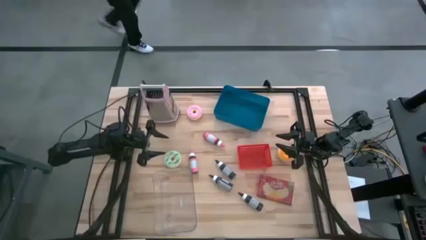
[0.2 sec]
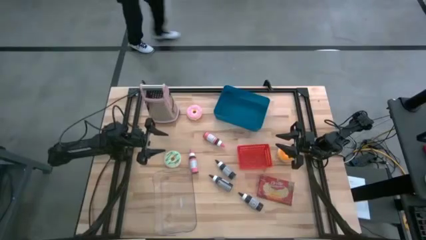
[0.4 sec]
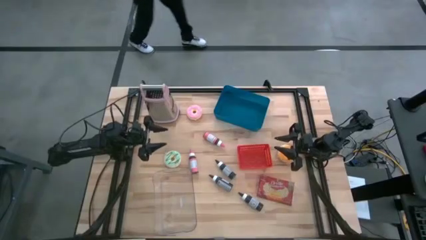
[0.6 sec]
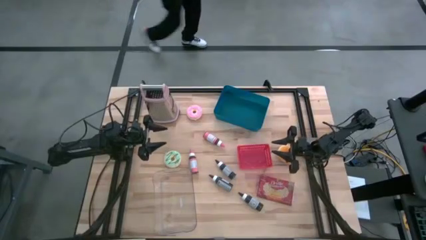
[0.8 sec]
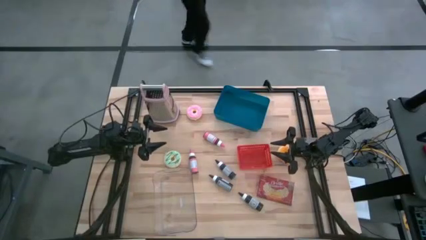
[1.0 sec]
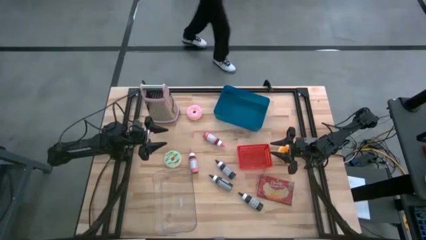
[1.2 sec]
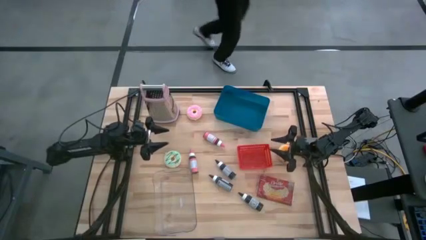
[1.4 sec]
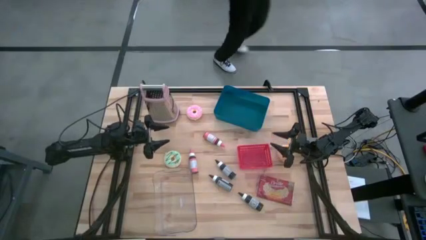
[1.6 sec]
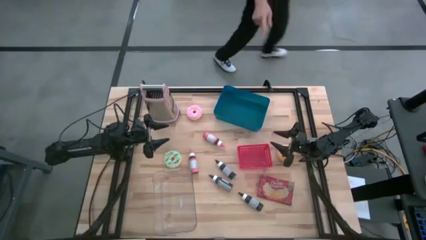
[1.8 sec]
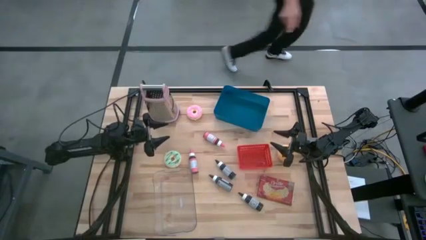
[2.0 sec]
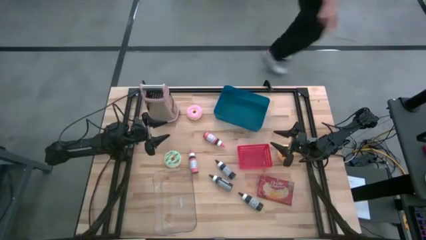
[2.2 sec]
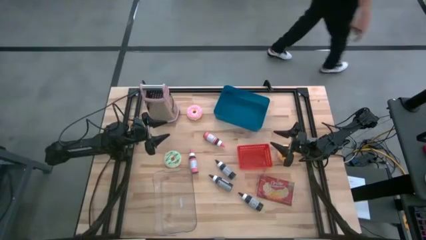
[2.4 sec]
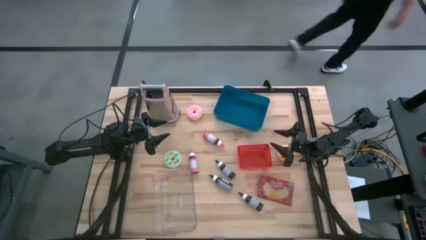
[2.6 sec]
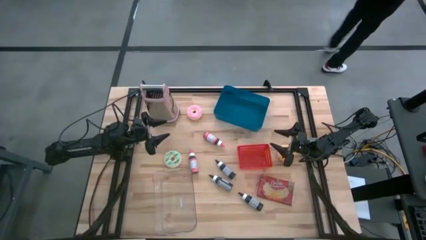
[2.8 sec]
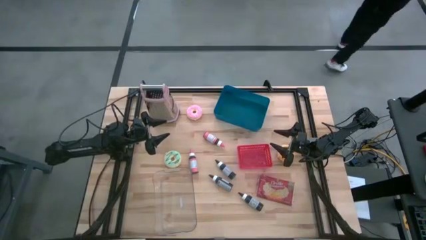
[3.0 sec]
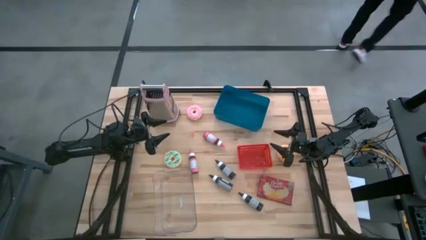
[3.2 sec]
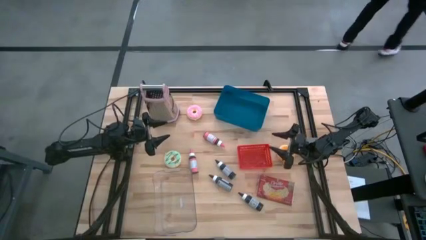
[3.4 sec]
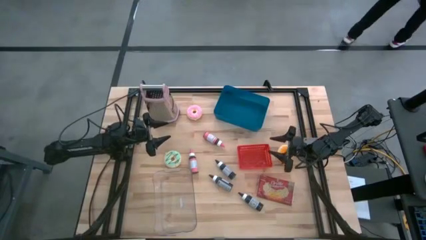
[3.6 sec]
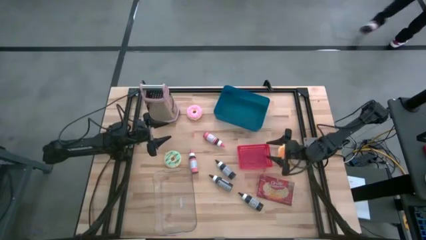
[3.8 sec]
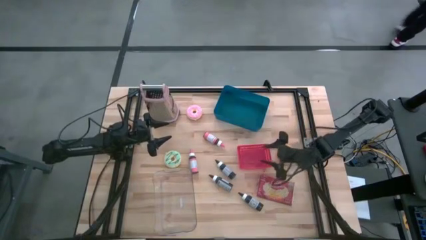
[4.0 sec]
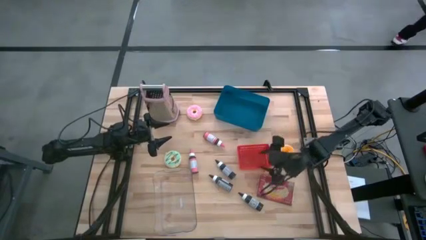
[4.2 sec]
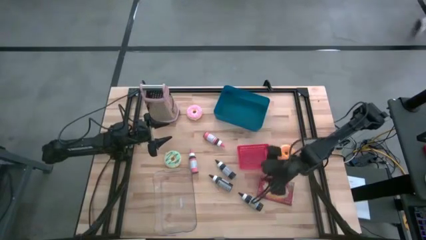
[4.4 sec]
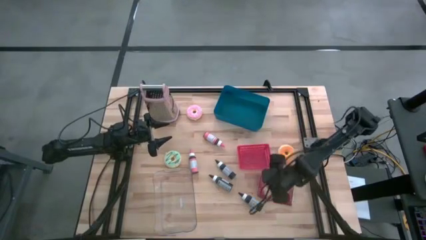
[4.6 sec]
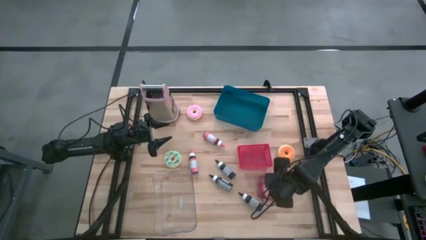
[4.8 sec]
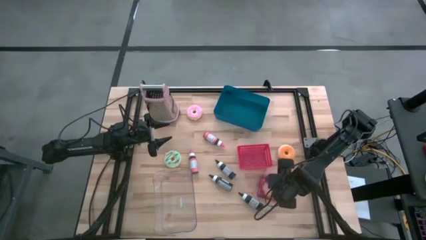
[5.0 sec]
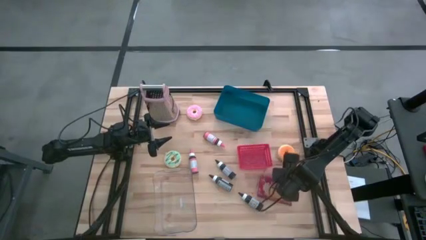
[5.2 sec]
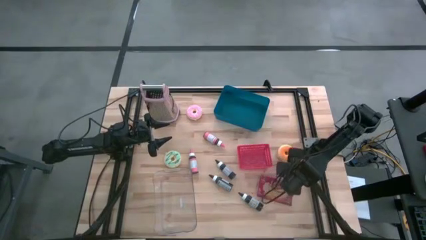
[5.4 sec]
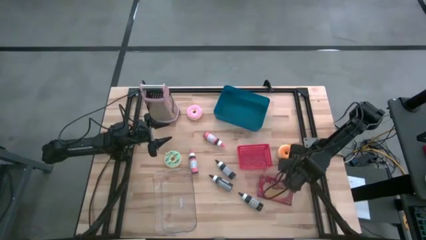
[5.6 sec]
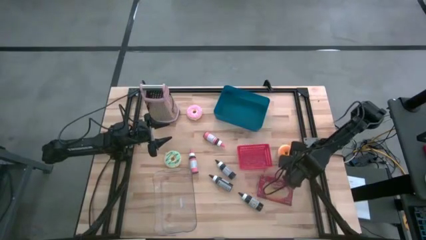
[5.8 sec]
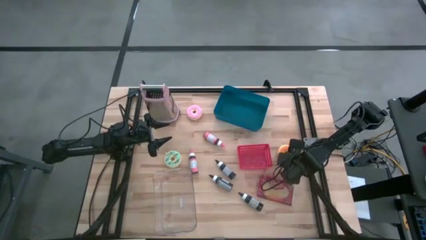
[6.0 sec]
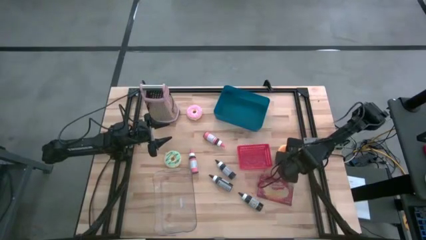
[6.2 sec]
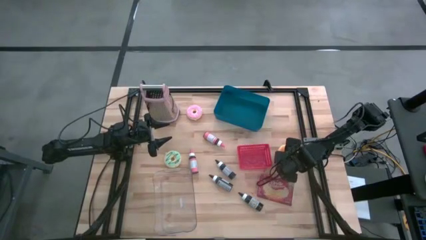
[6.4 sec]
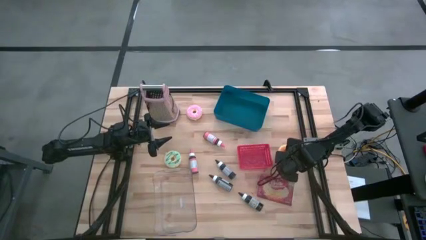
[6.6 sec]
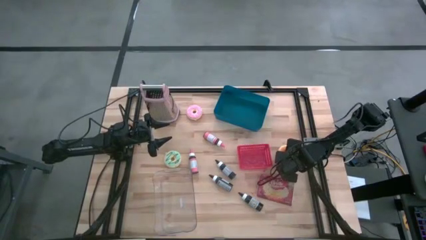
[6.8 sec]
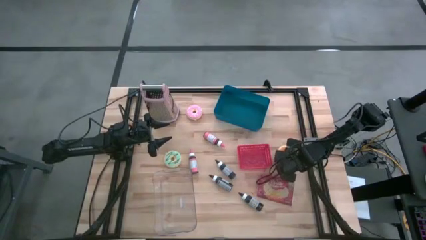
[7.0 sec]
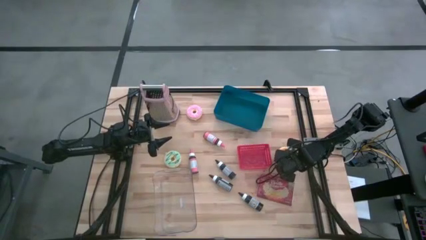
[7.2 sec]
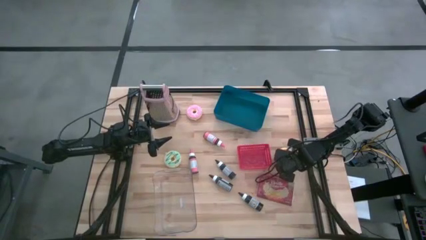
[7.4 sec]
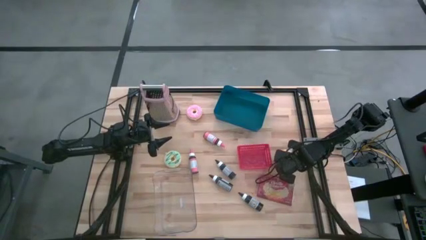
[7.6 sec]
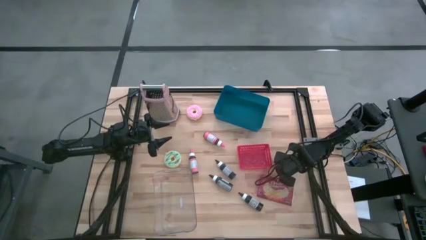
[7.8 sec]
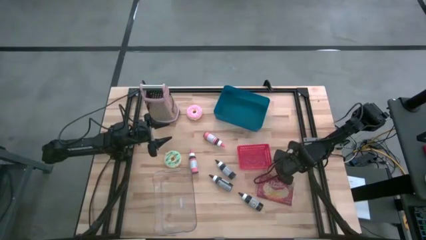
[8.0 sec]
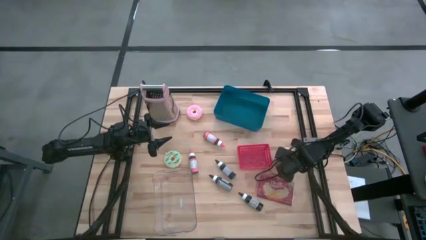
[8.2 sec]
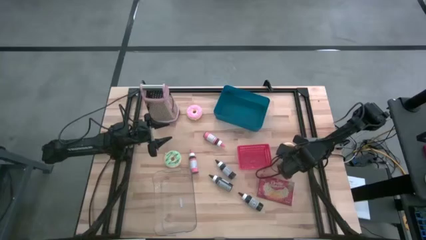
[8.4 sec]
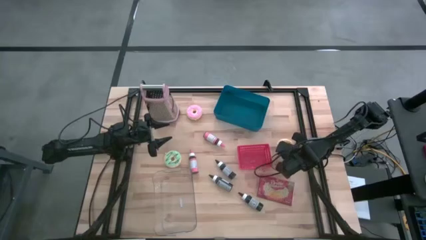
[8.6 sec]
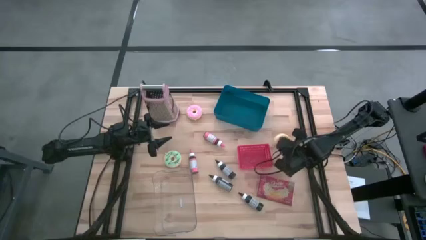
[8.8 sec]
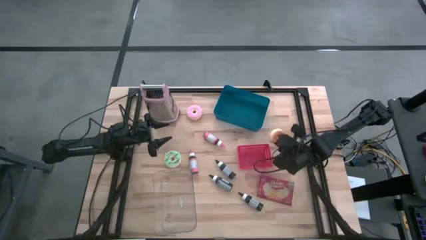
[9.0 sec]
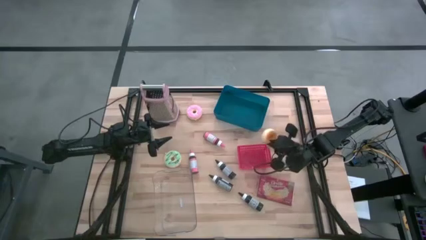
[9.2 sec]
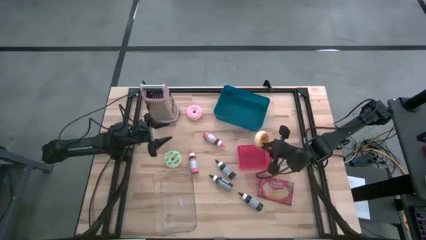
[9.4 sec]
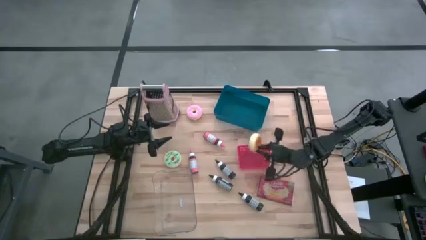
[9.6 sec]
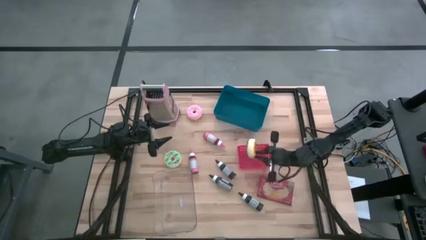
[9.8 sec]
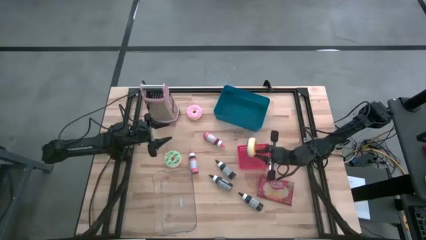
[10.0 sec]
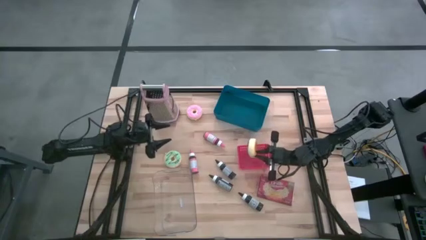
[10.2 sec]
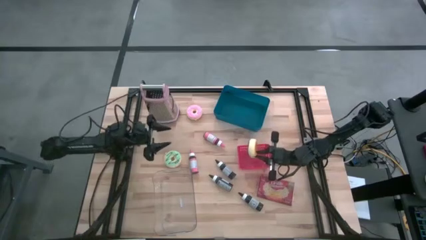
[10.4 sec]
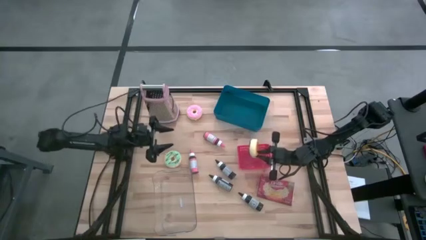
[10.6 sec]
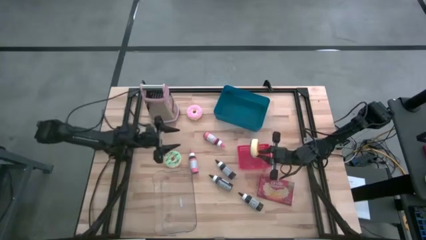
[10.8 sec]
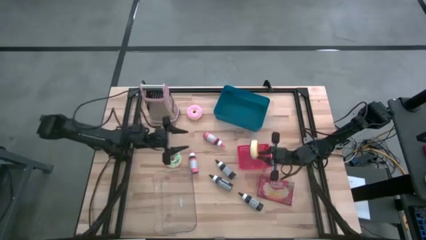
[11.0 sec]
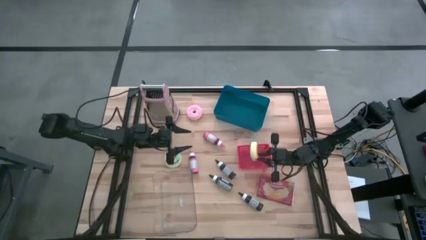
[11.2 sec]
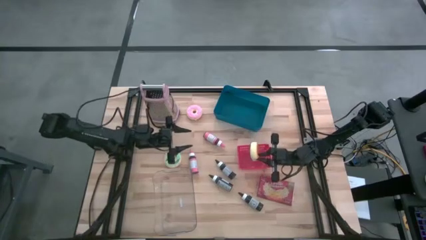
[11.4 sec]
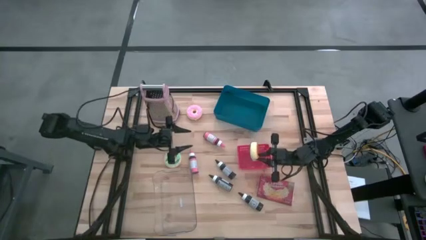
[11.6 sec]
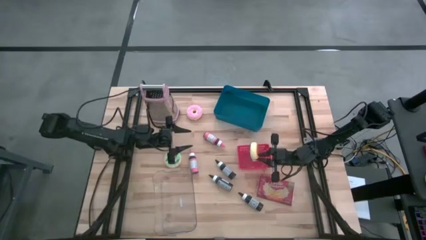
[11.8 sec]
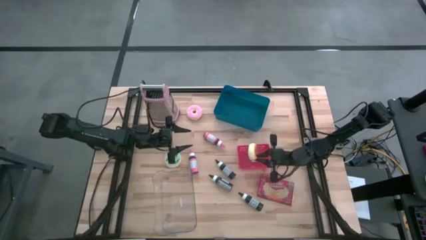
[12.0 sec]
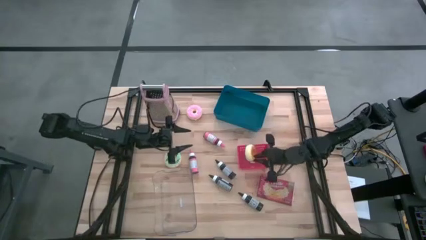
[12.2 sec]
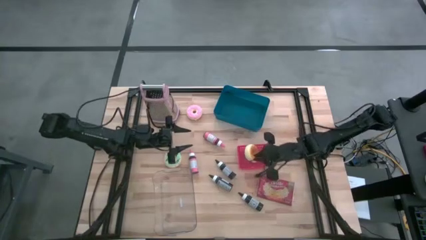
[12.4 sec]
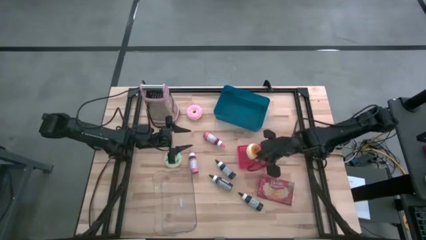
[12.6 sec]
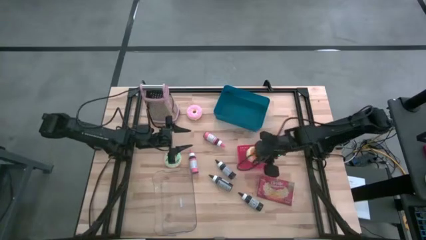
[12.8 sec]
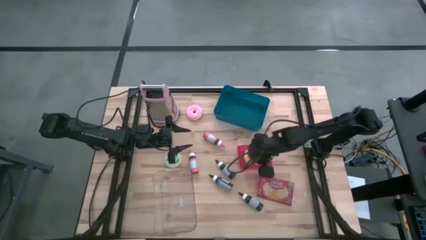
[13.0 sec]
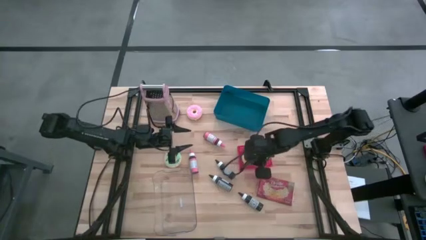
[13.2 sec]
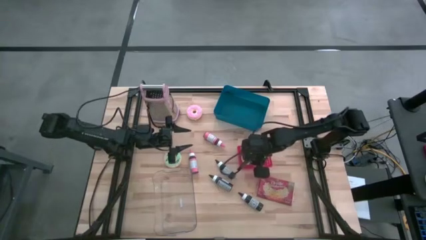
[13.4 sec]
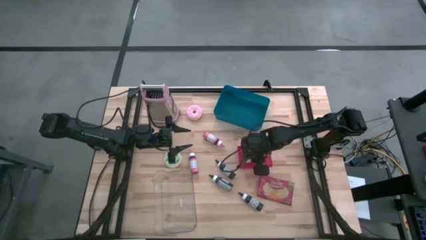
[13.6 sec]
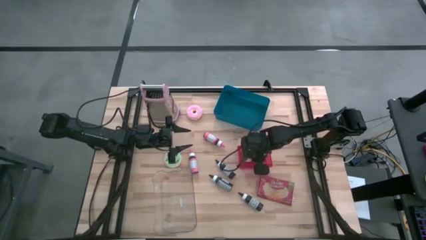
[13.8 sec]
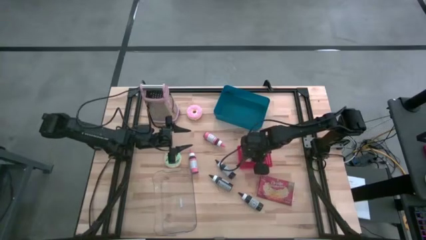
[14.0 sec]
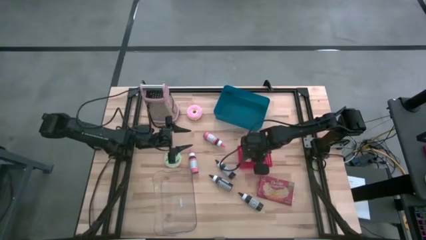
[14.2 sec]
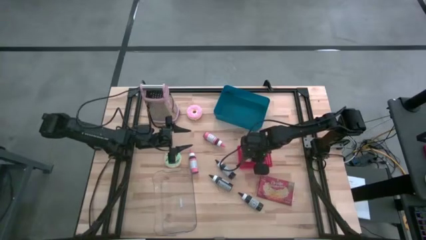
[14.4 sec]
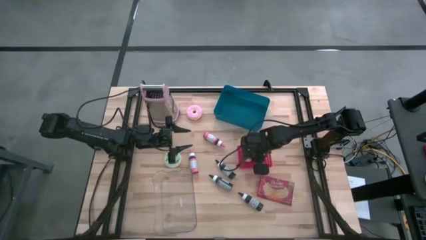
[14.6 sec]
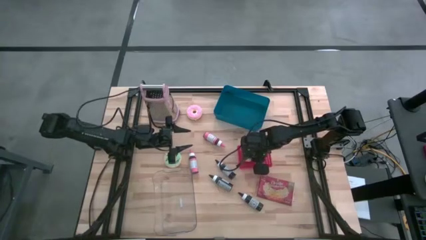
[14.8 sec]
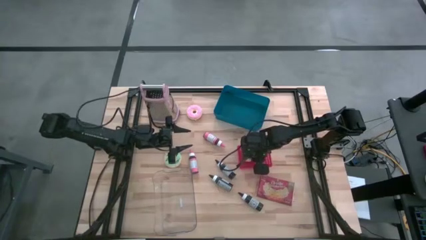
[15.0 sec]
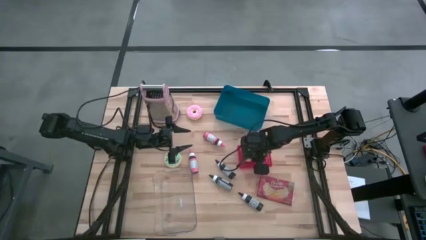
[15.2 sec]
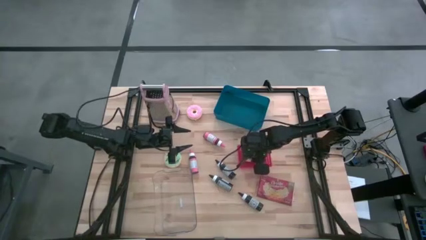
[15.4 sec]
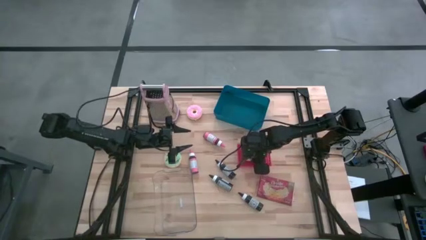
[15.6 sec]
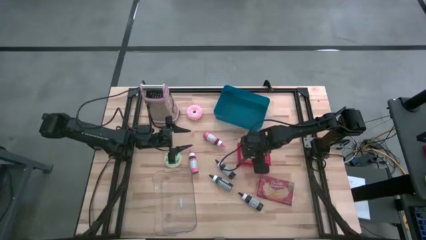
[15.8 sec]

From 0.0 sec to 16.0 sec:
Task: Pick & Place Food Item
Put the black donut into the red basket
